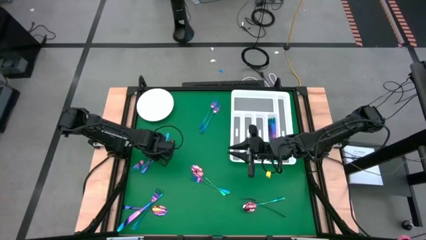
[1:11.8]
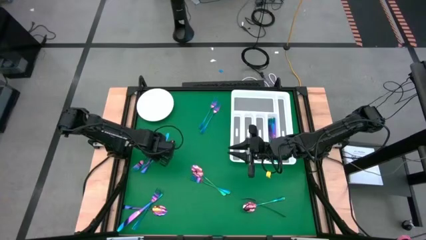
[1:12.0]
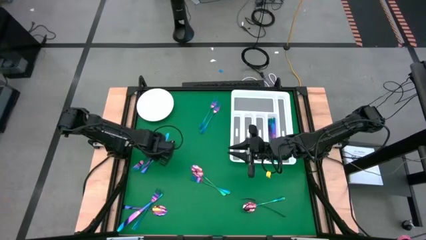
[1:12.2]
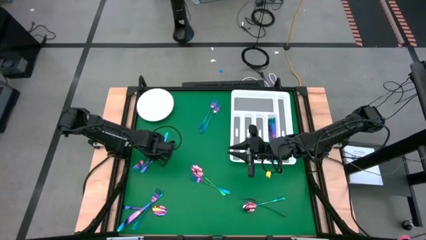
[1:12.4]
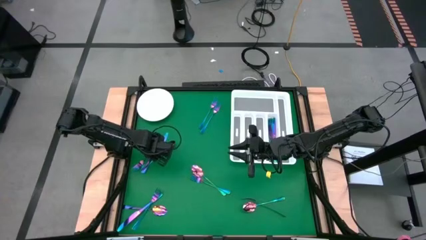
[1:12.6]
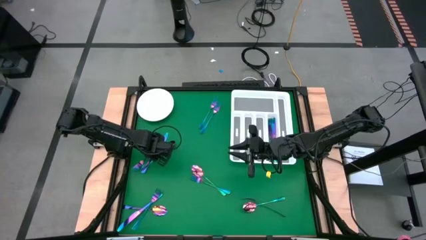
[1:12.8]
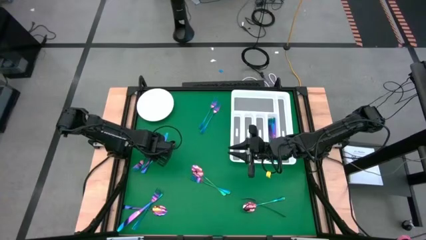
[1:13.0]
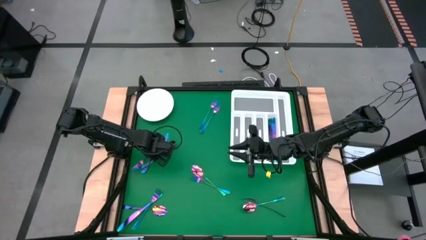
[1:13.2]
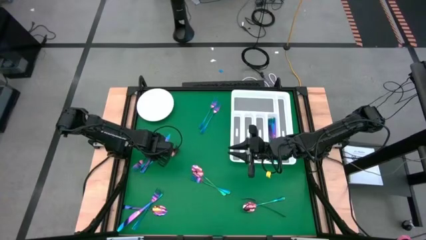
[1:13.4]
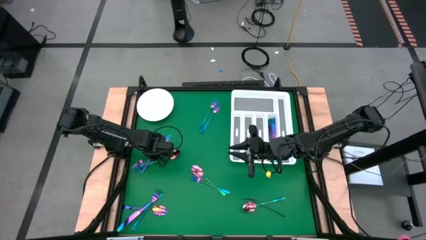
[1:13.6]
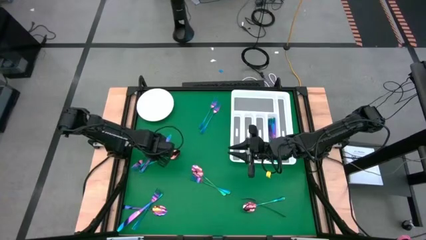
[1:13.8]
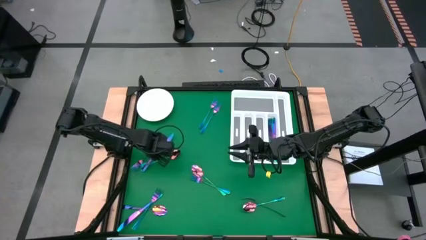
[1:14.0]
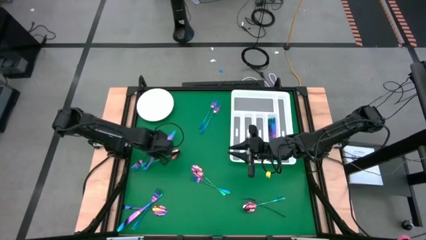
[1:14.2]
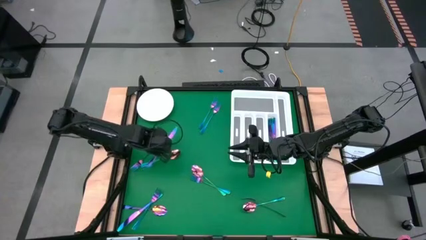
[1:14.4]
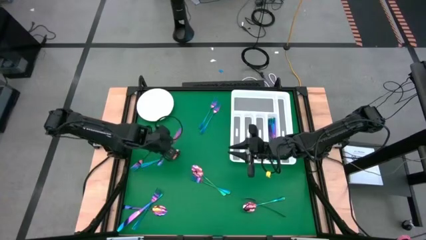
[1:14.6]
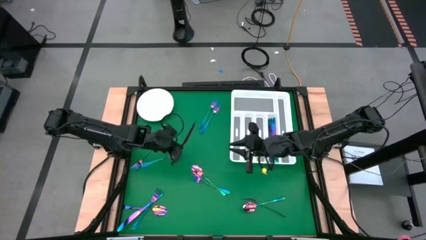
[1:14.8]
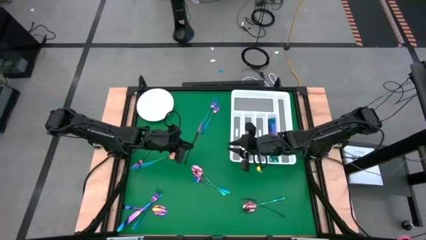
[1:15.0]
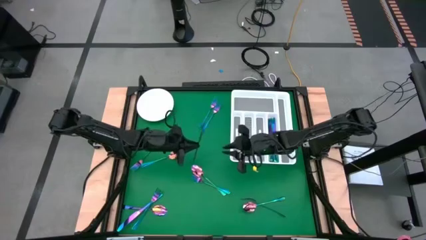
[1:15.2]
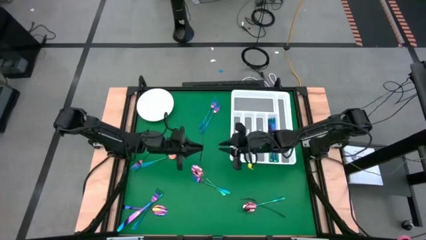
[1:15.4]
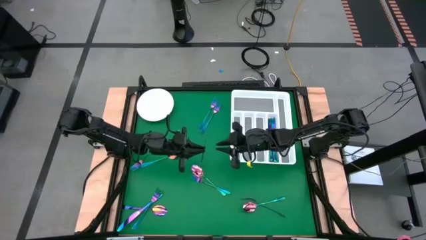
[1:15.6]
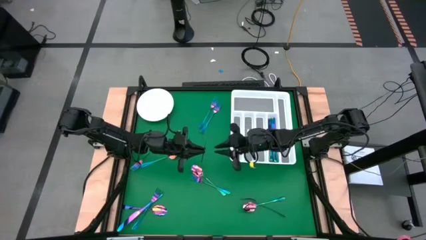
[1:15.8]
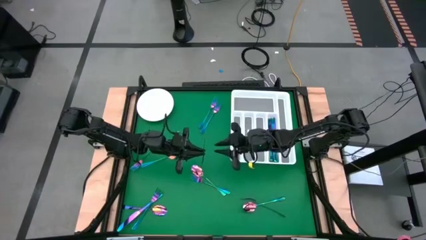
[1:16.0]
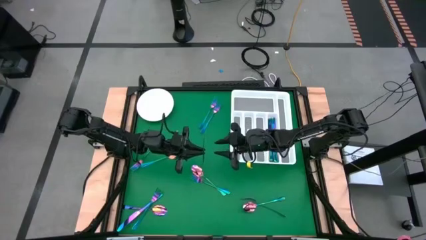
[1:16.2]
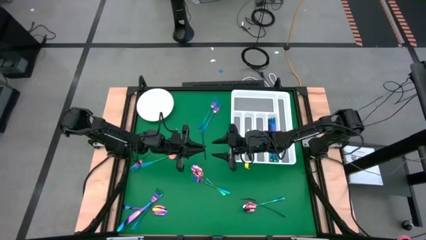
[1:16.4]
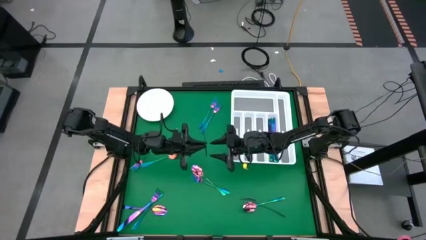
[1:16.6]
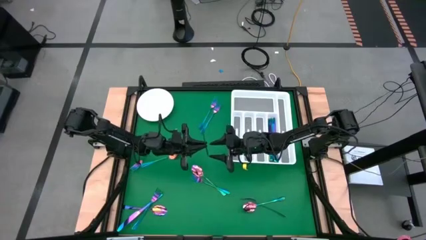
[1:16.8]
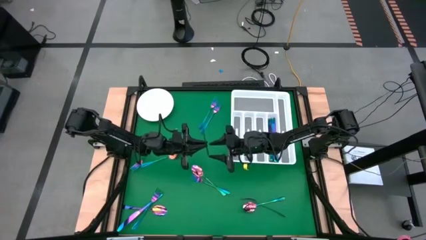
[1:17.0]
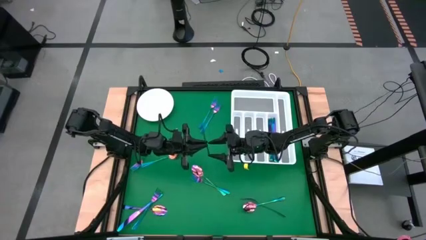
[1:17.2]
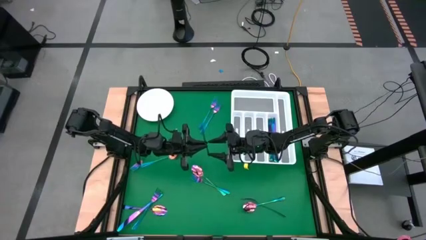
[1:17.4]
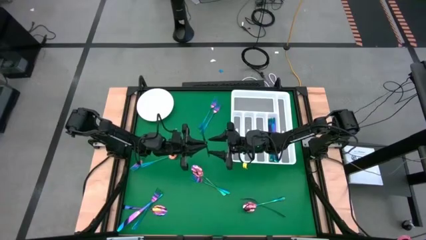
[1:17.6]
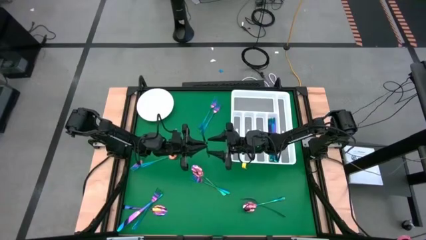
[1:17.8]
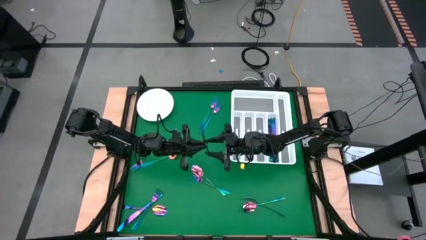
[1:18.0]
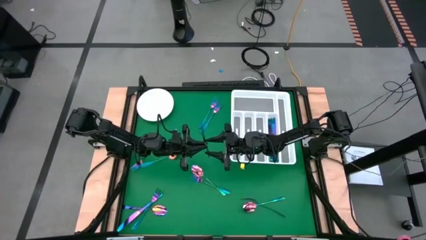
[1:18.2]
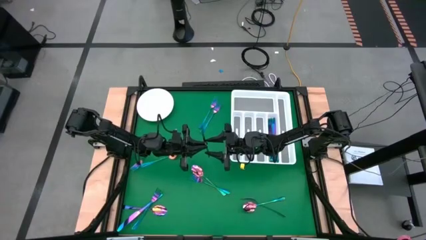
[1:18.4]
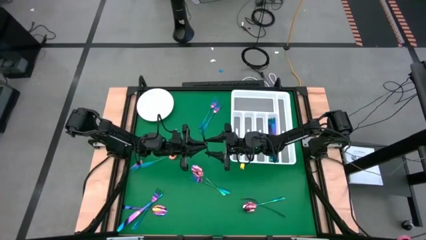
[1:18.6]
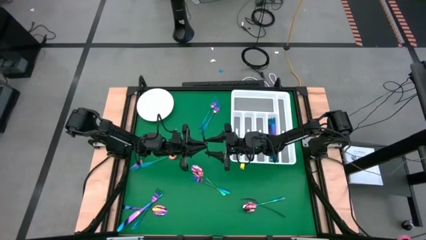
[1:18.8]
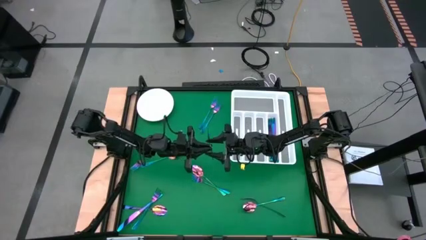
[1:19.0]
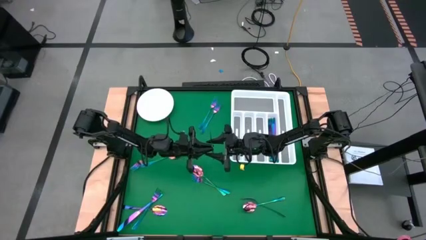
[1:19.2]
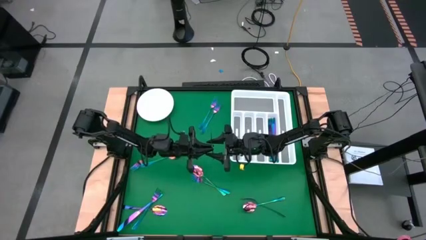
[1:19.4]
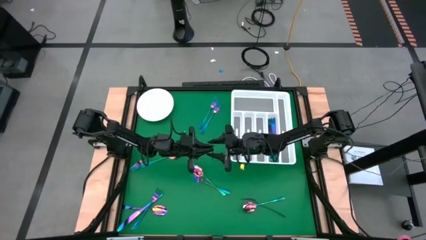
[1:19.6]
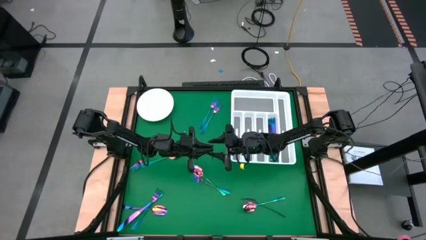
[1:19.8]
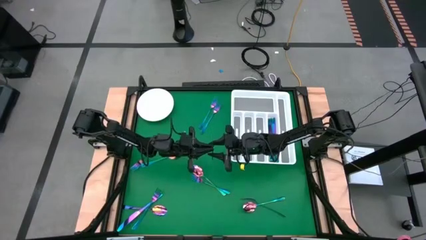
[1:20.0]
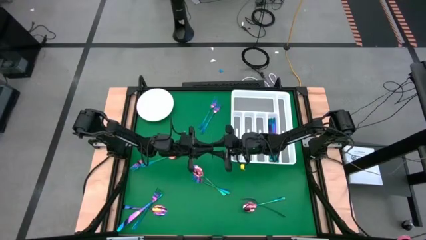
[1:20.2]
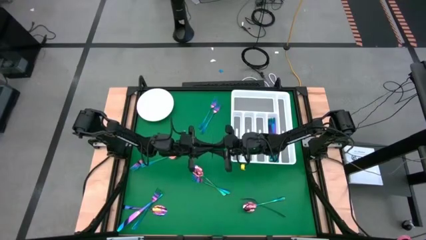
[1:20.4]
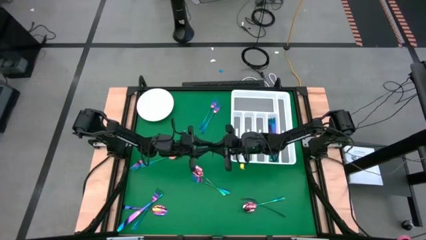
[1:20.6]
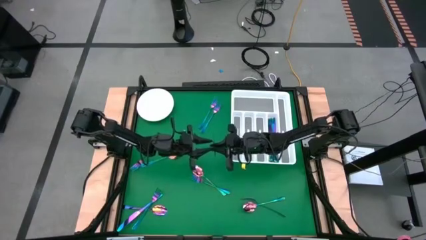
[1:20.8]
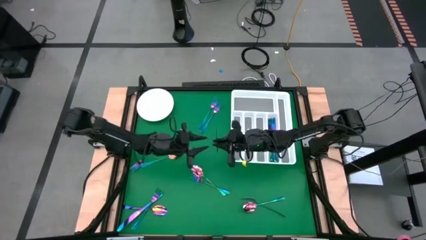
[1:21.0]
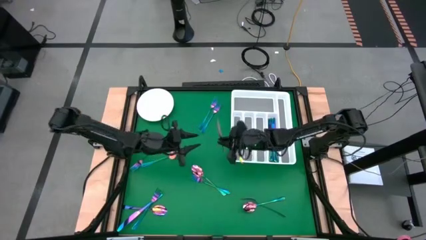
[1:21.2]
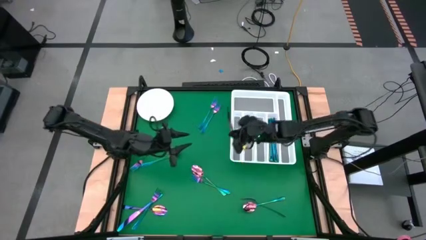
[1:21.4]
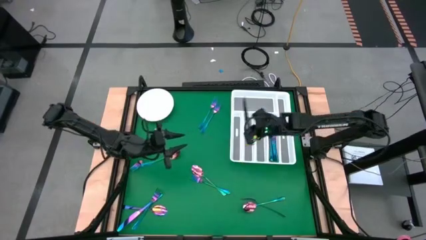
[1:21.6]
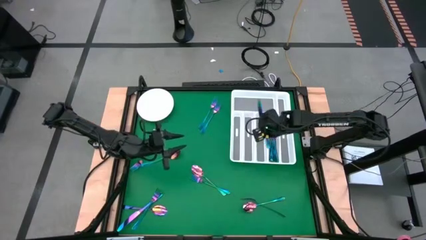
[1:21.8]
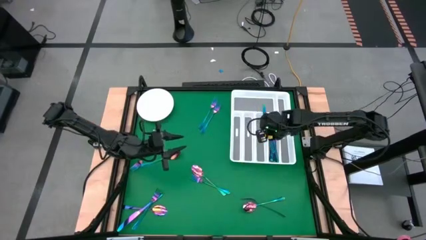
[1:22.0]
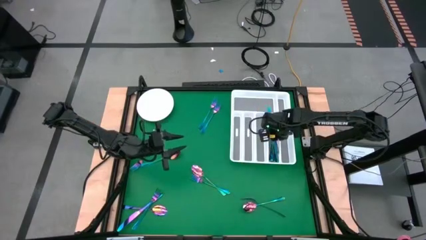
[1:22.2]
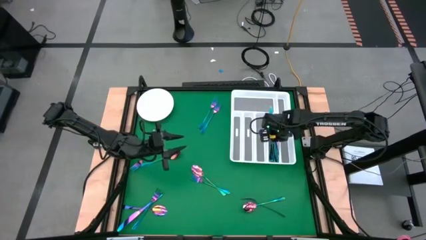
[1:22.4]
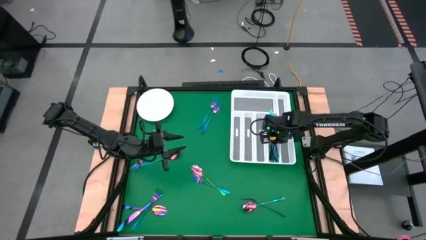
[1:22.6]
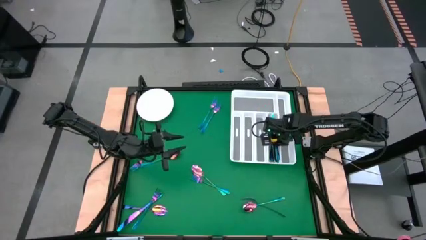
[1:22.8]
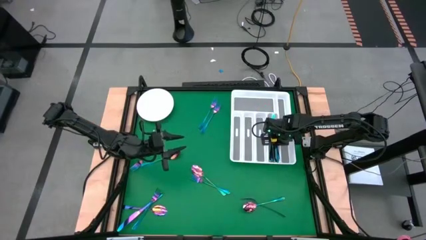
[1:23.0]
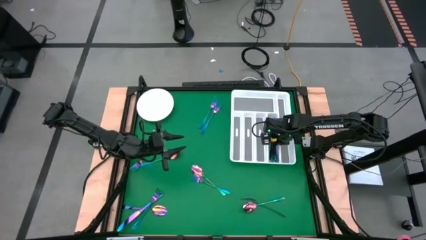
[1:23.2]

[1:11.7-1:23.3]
Task: Sort silverware
Put the blue knife into the white cutlery tray

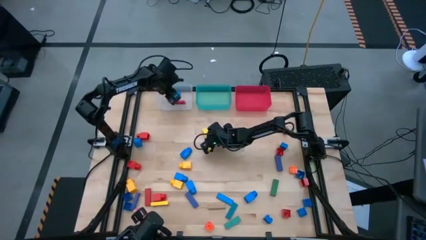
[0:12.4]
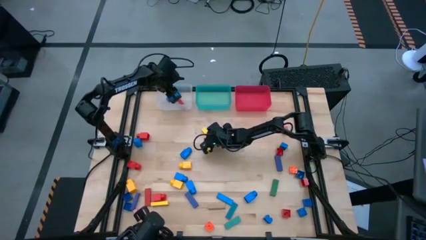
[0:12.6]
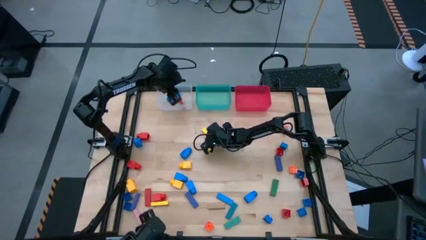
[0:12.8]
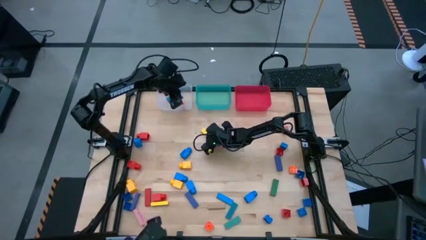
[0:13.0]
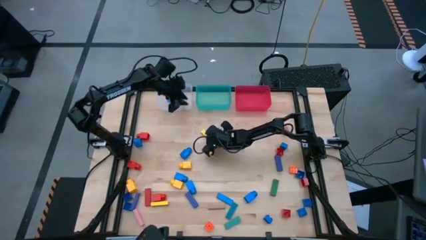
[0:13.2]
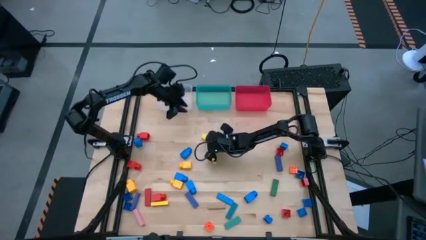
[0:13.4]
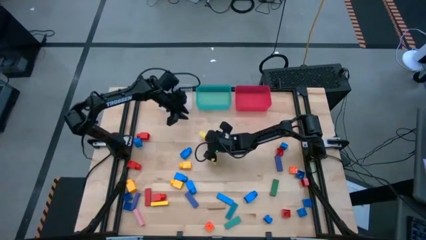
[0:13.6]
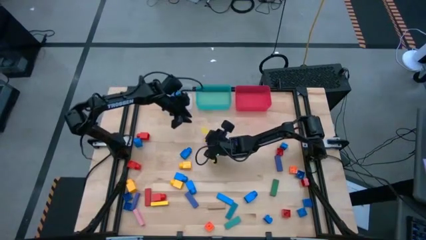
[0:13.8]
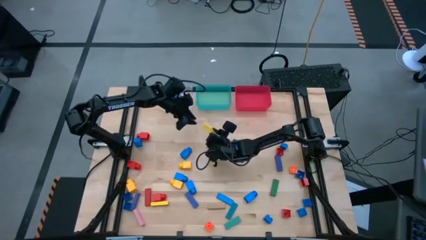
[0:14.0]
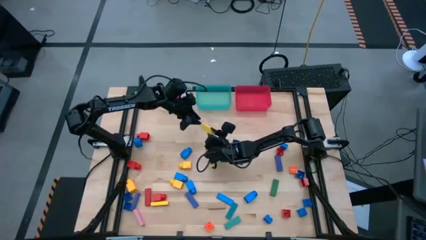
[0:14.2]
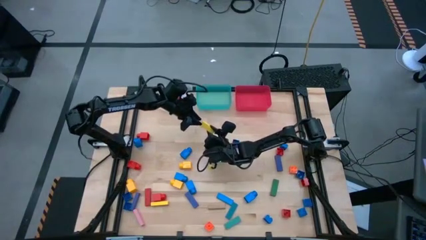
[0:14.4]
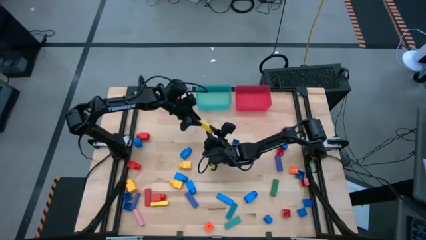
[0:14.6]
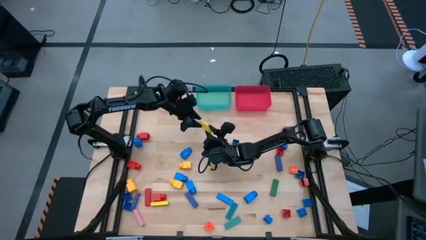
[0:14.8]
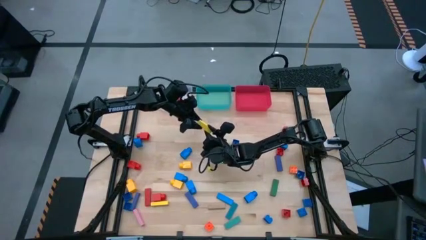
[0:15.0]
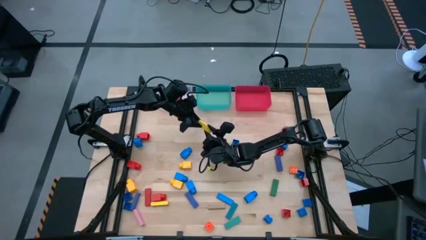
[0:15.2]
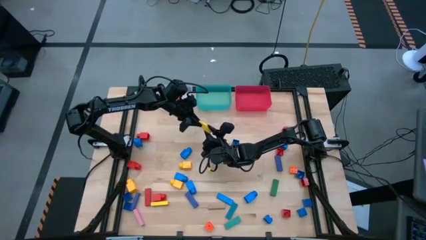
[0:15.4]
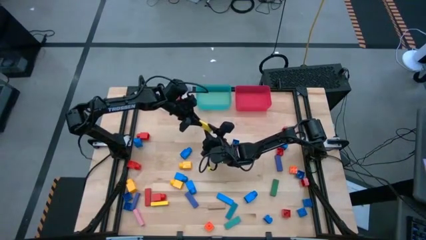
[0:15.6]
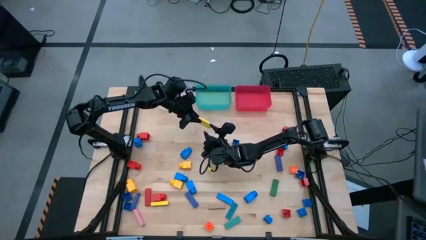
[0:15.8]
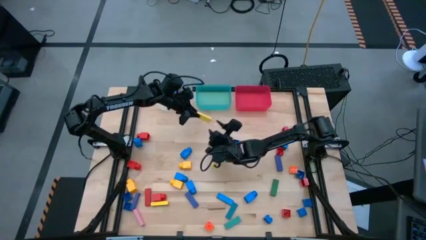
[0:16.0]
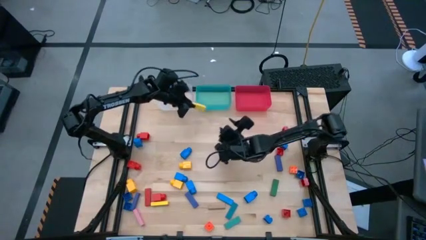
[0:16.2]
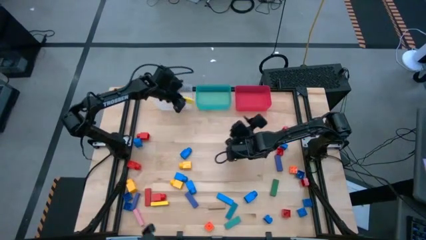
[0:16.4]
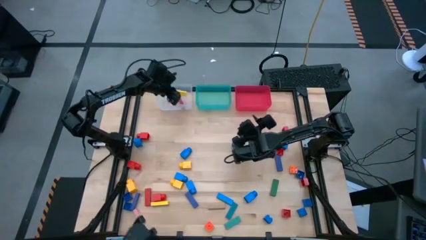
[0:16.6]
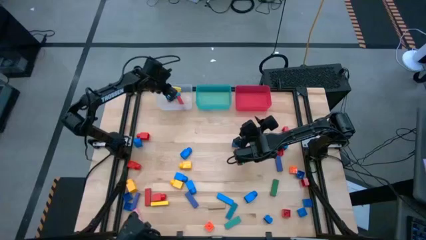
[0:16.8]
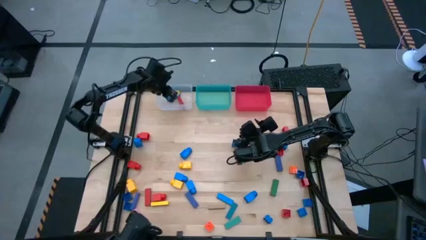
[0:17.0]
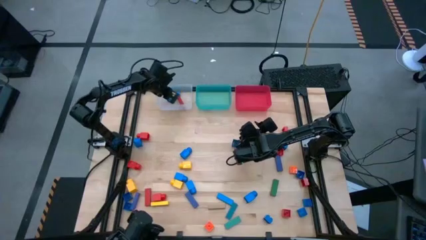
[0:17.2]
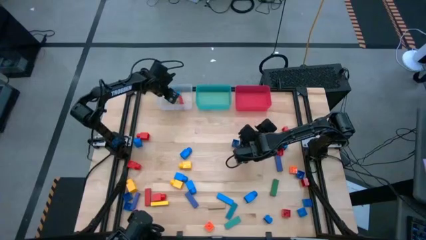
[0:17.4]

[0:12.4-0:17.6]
Task: Sort blocks by size
Put the yellow block into the transparent bin
